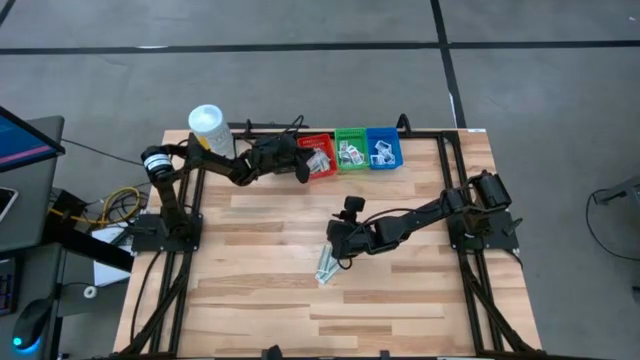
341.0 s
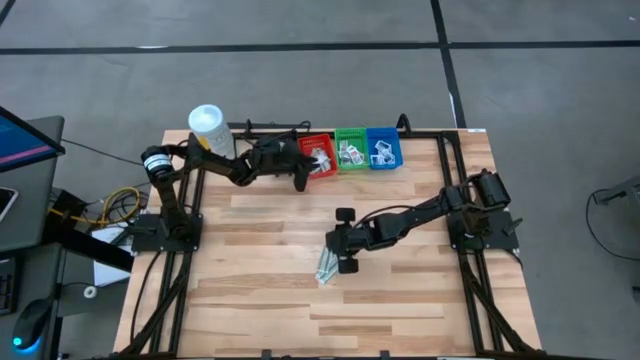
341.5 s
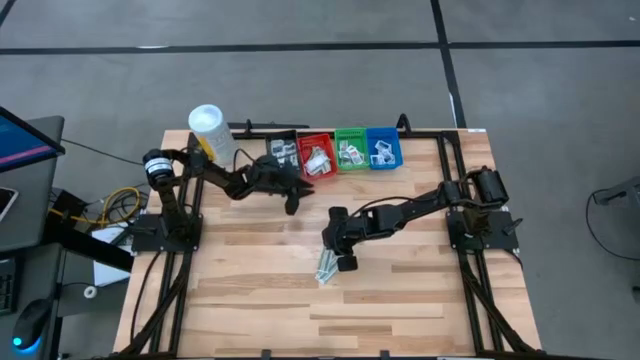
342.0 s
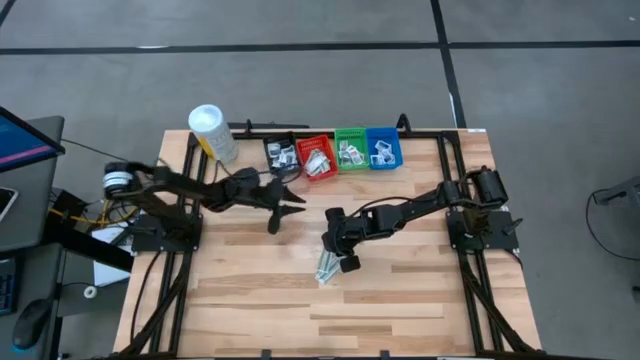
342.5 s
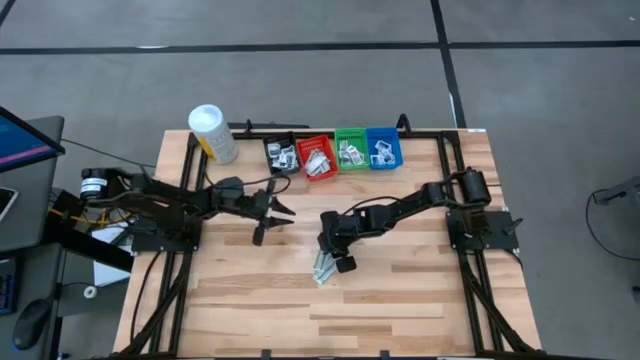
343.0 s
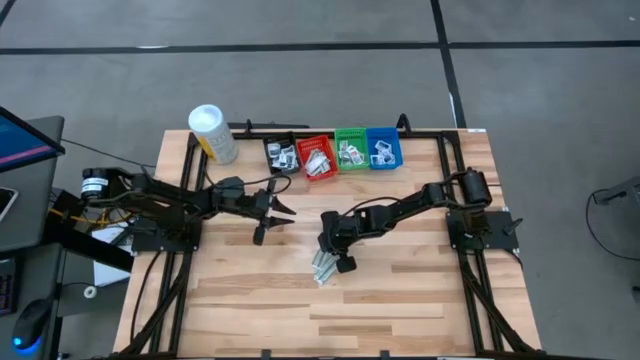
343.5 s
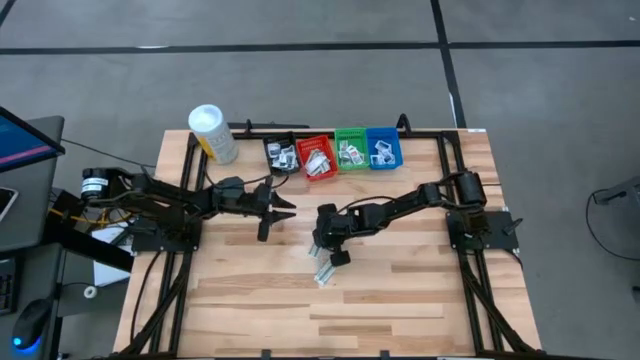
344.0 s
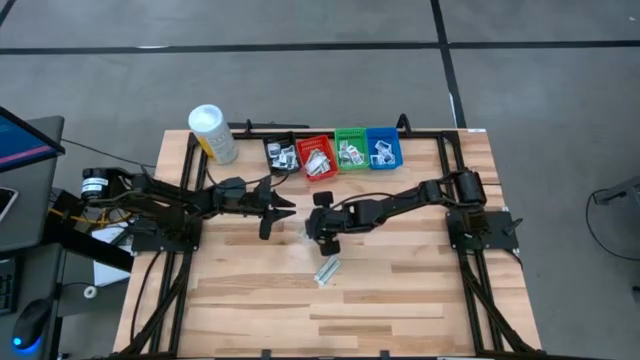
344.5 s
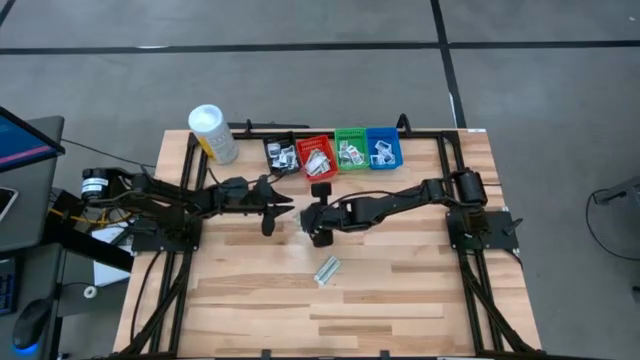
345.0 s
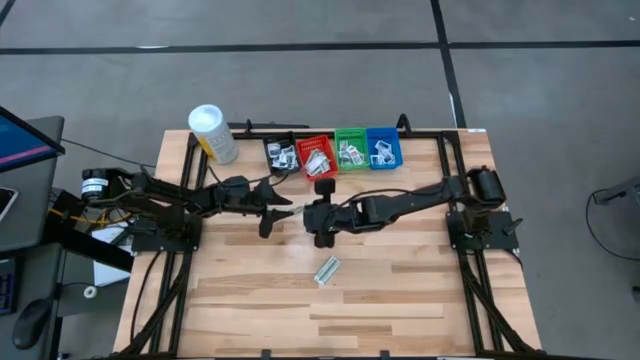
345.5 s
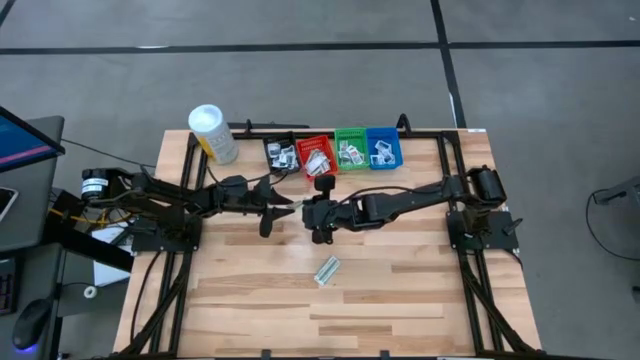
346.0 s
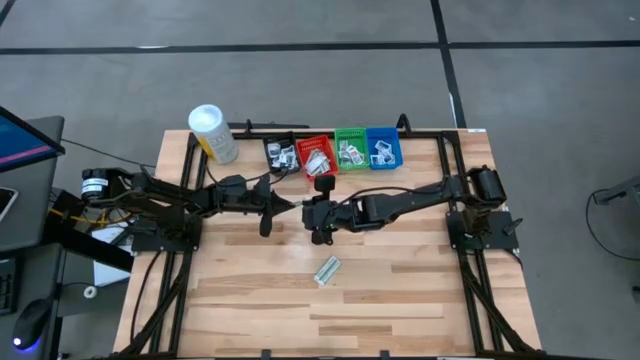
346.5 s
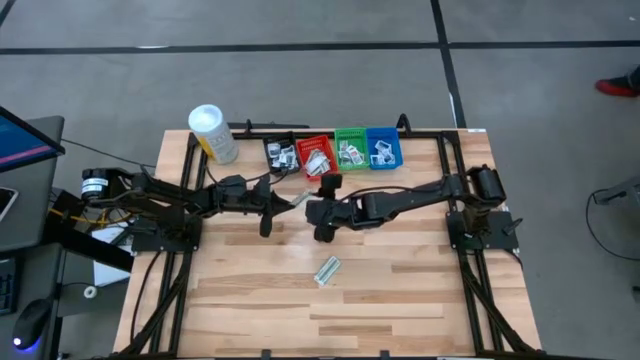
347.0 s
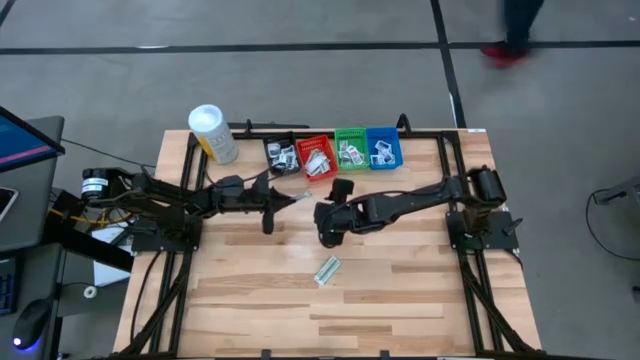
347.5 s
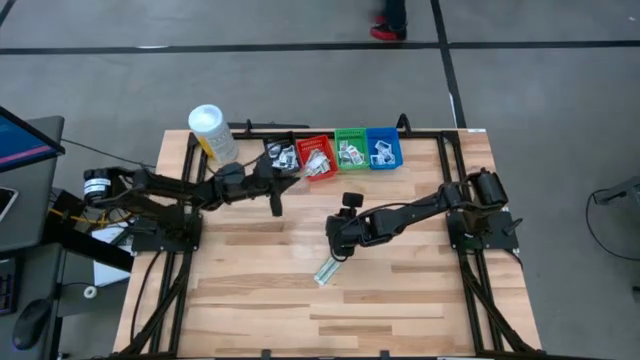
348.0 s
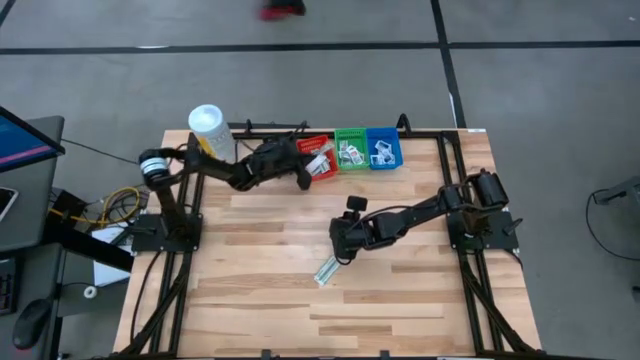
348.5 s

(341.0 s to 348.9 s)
Task: Pick & Place First Aid Supplies
Put the green bandage pack into the red bin

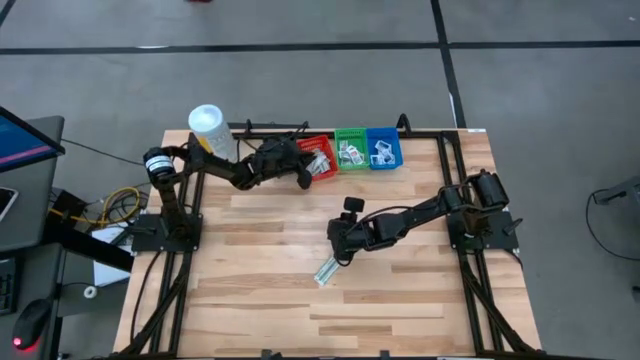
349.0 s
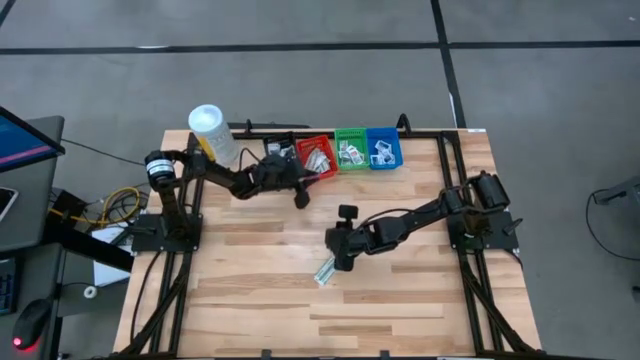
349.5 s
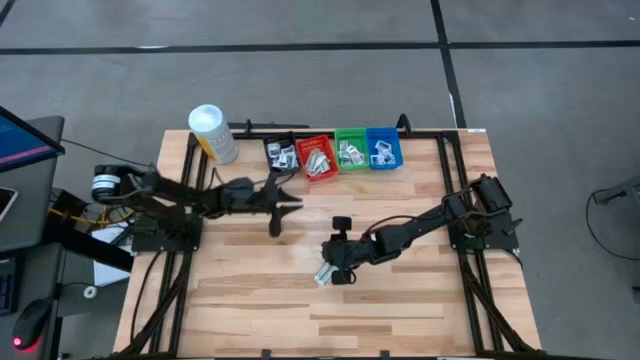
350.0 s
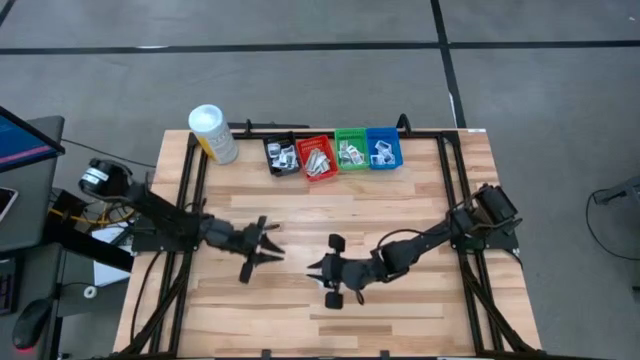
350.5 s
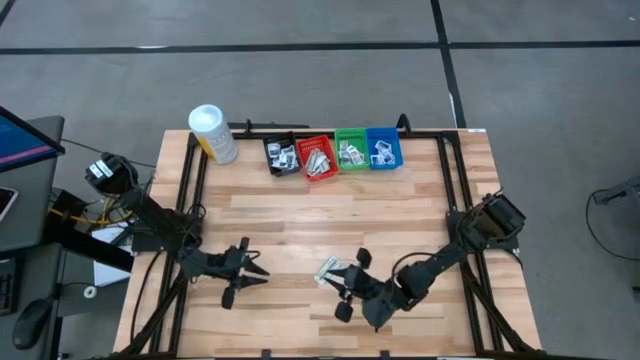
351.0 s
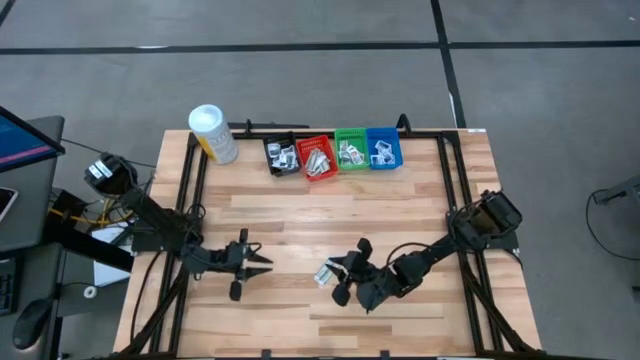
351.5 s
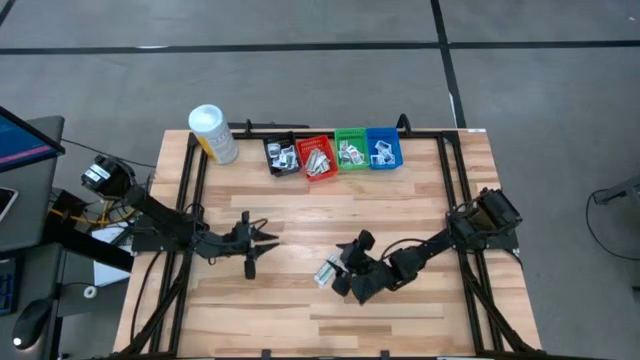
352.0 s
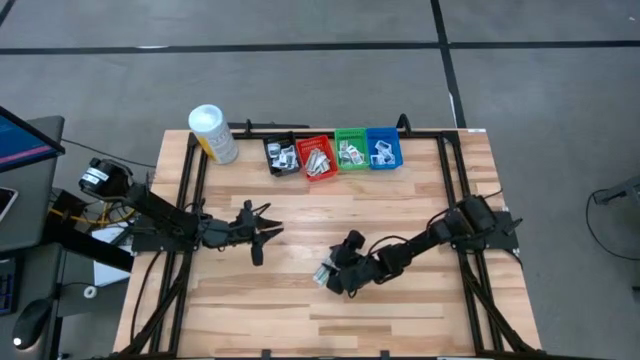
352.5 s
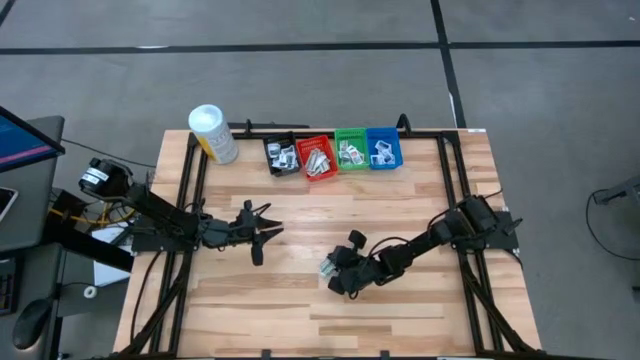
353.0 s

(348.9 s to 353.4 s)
Put the green bandage pack into the red bin

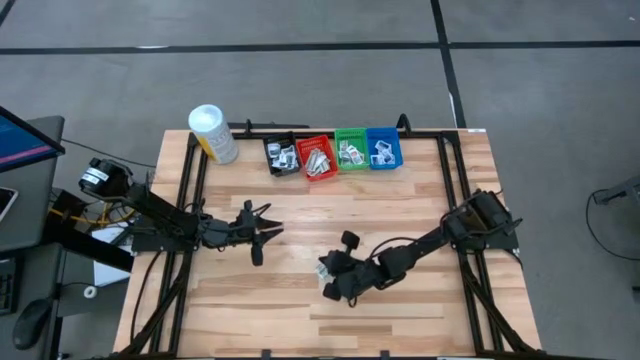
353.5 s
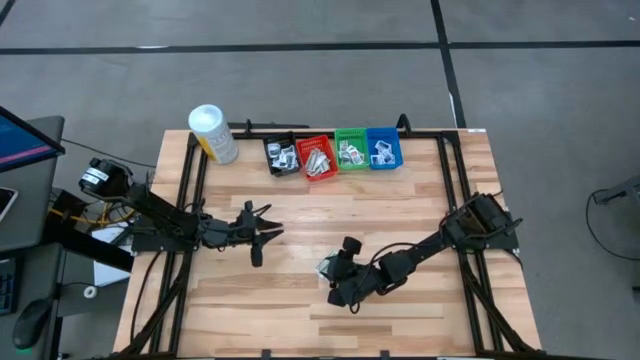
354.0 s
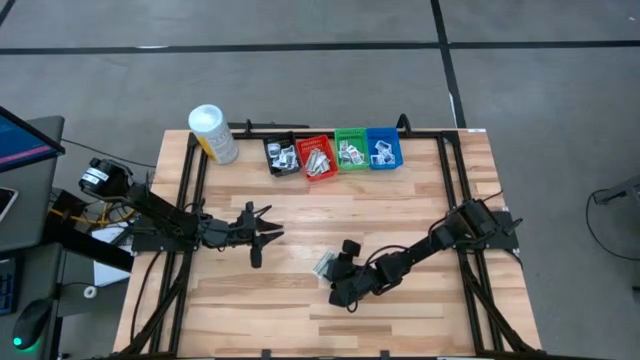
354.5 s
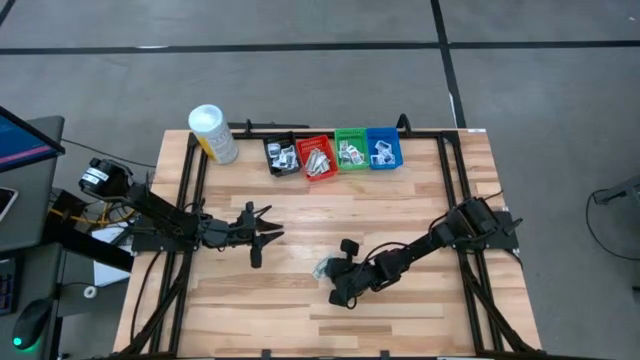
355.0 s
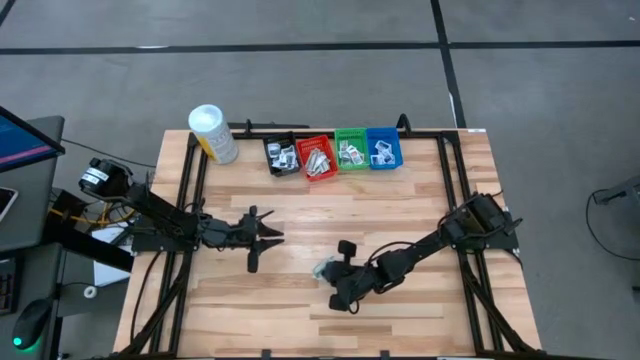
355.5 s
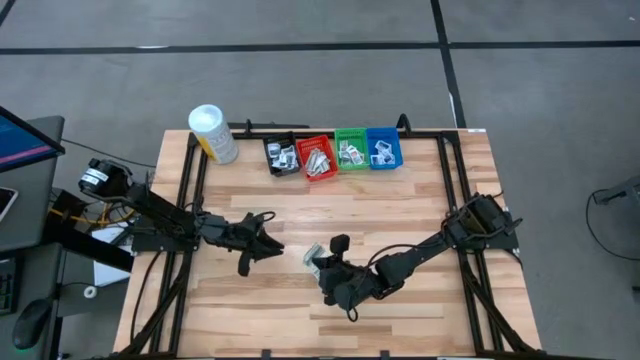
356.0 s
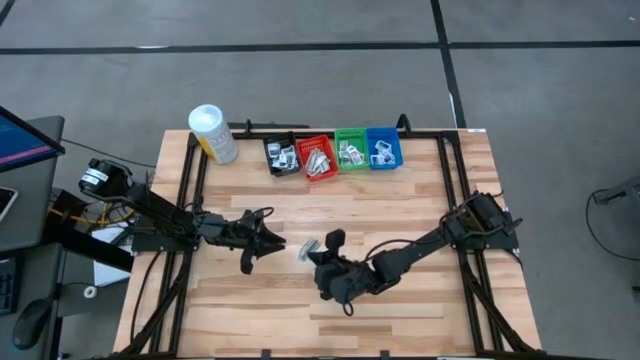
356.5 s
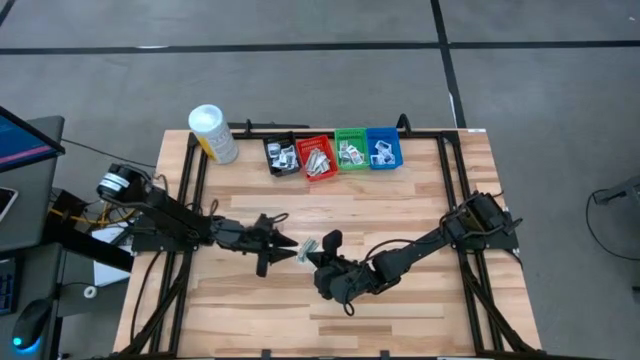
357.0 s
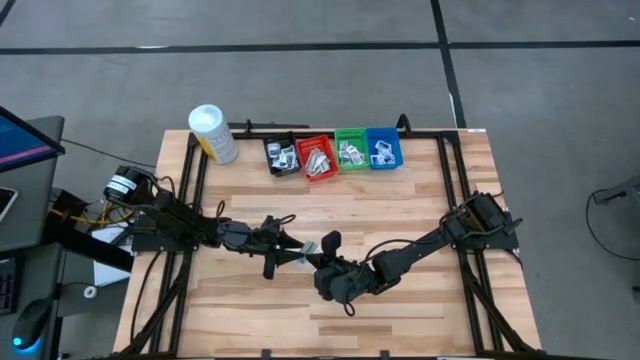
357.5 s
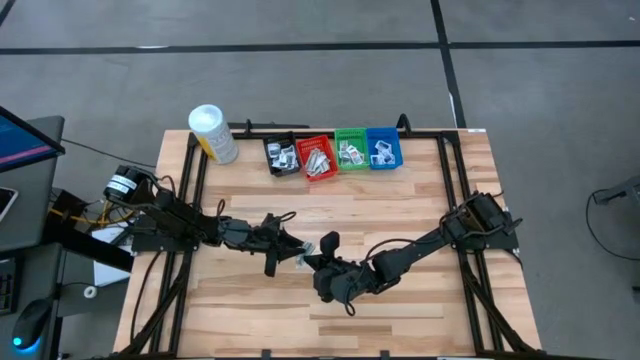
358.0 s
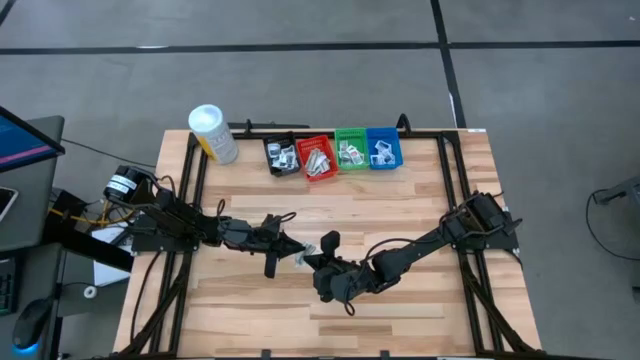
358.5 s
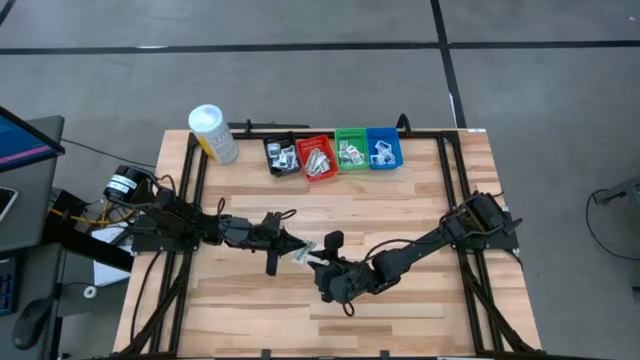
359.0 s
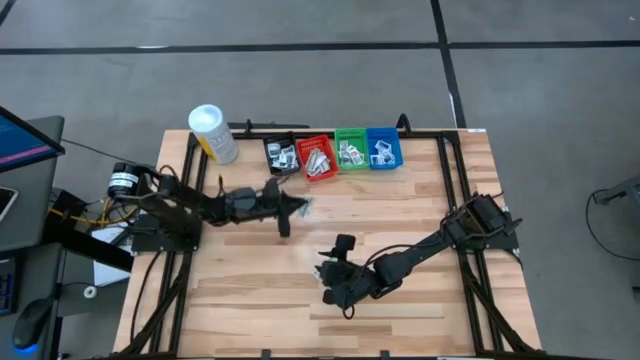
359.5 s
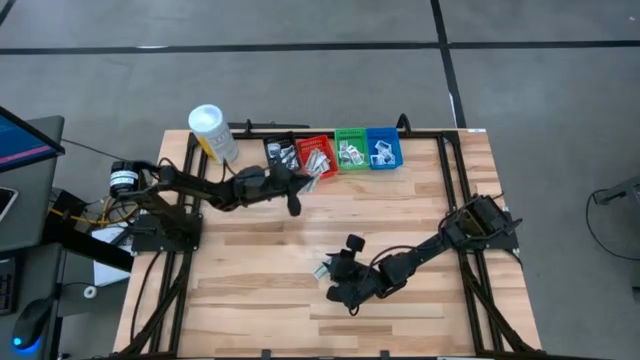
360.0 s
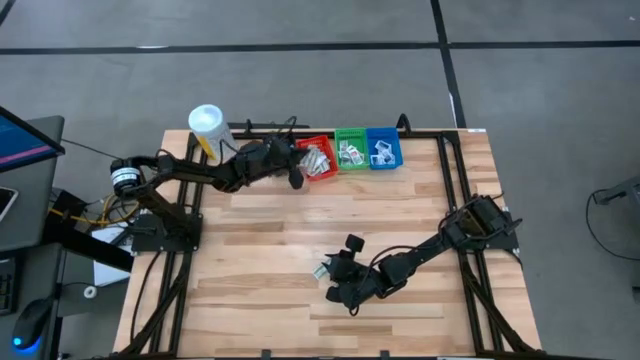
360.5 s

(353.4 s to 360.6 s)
Put the green bandage pack into the red bin

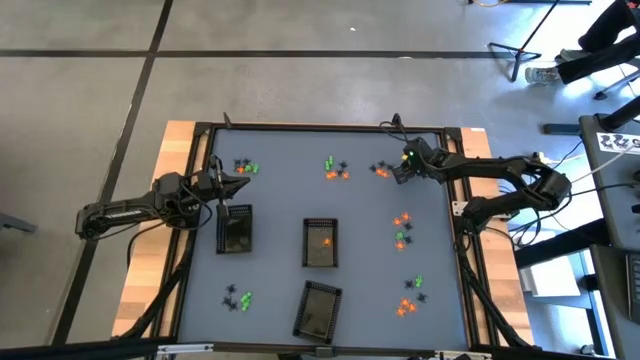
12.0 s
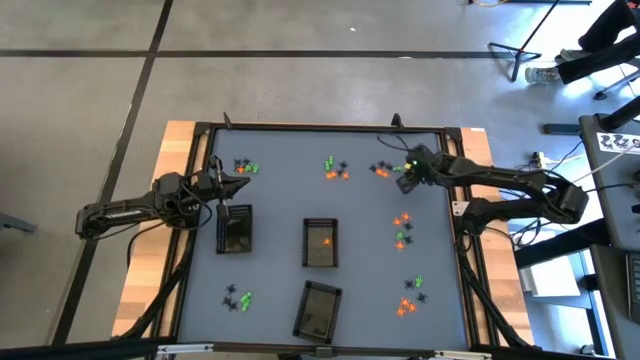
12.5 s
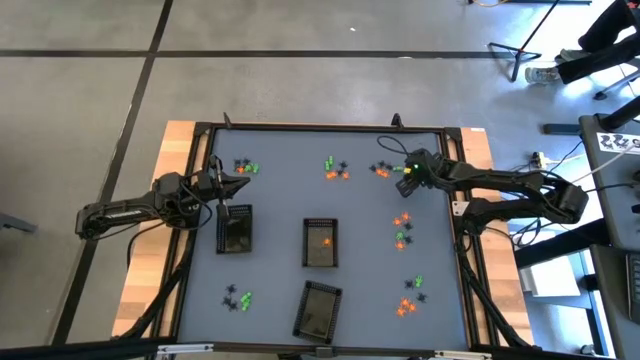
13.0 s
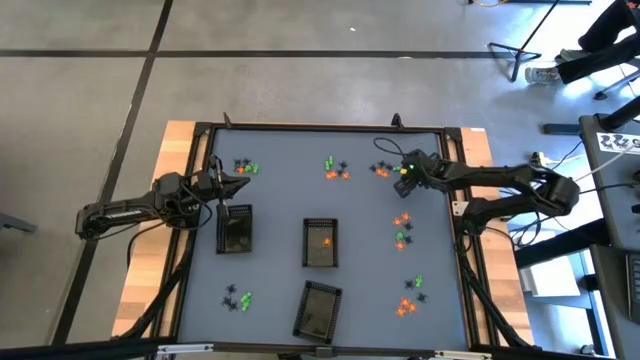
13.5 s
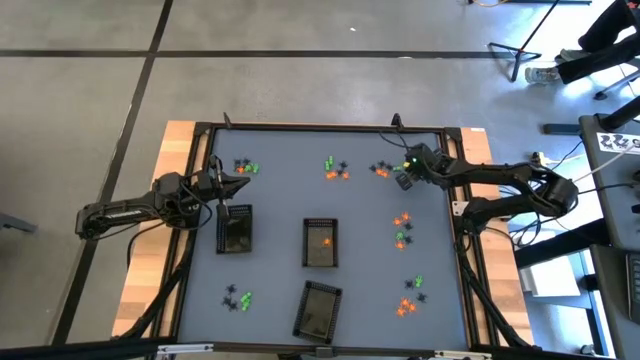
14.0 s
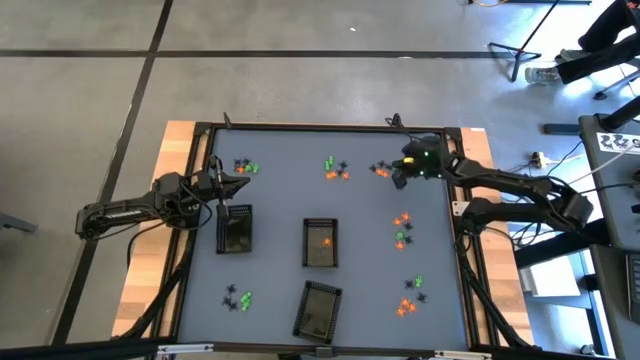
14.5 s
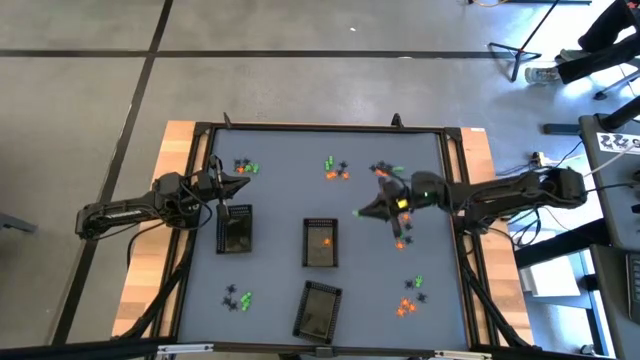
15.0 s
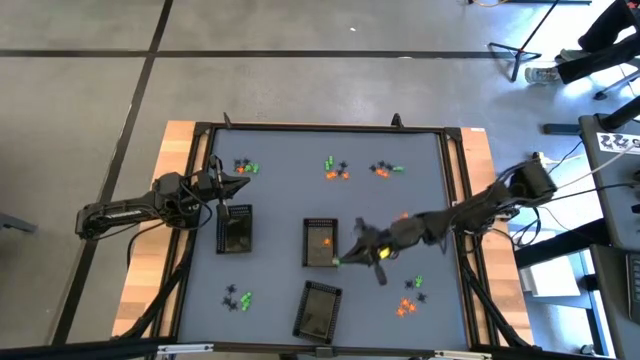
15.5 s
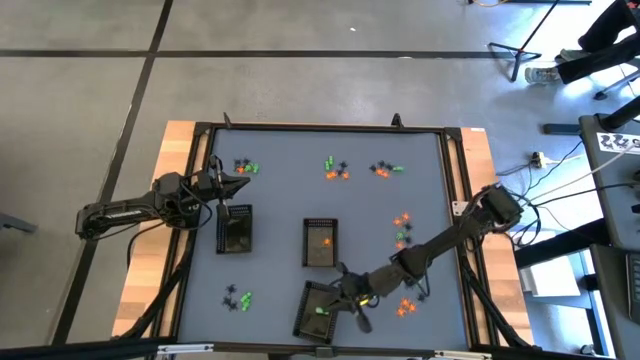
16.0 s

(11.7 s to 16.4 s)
Task: Sort Halloween decoration
Put the green toy skeleton into the bottom black basket
